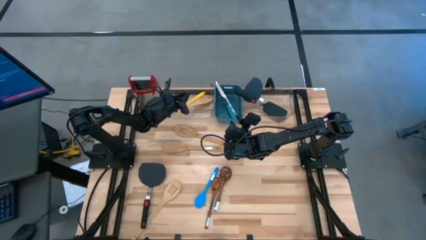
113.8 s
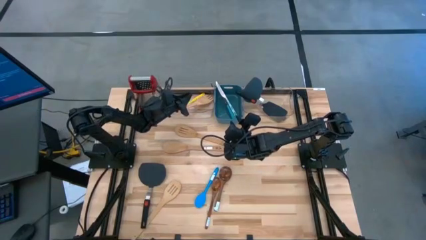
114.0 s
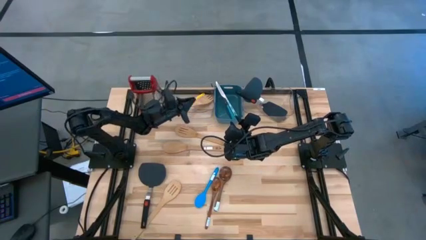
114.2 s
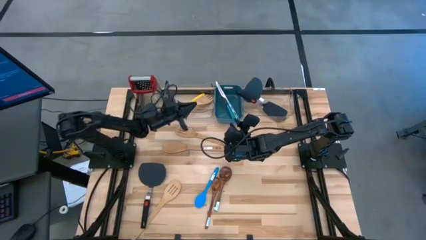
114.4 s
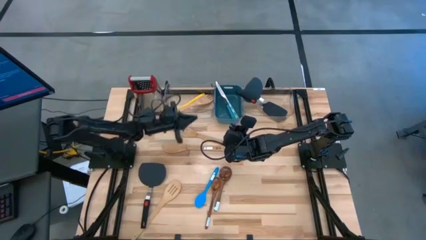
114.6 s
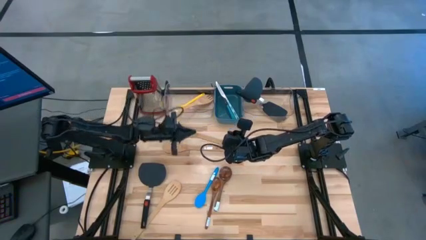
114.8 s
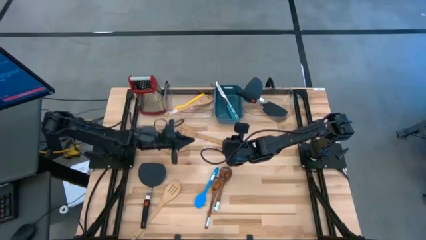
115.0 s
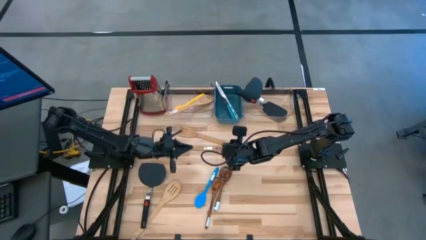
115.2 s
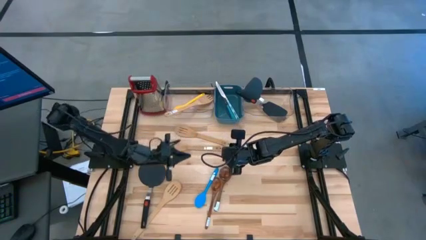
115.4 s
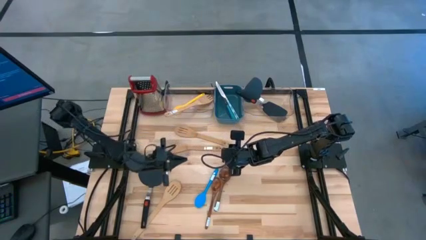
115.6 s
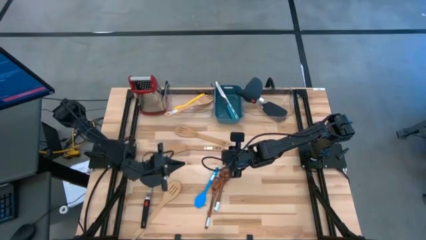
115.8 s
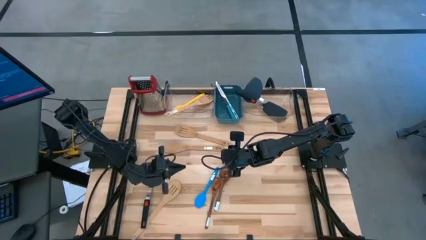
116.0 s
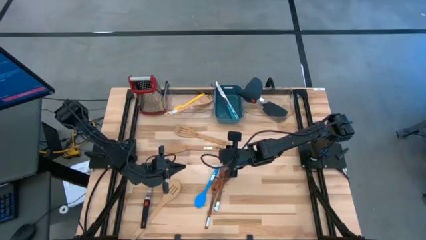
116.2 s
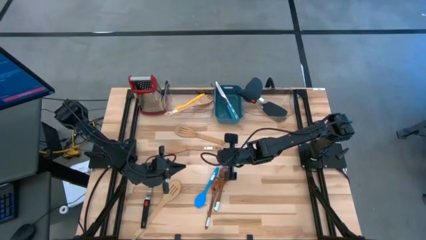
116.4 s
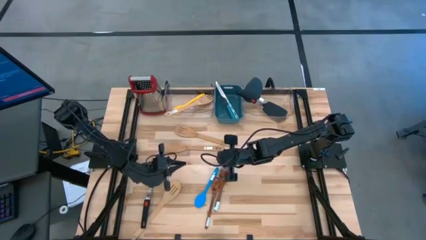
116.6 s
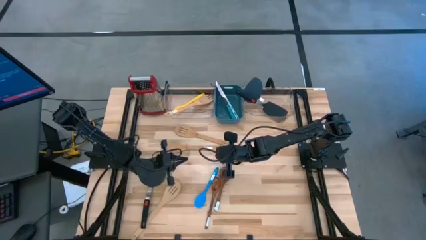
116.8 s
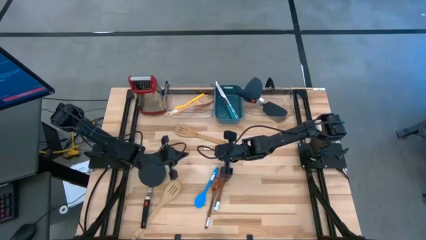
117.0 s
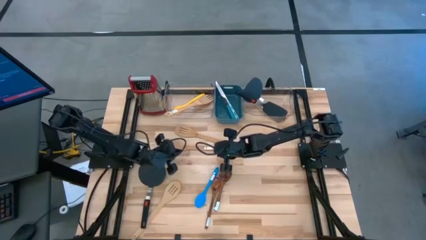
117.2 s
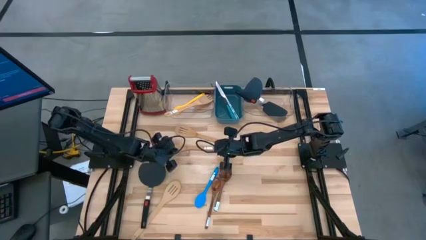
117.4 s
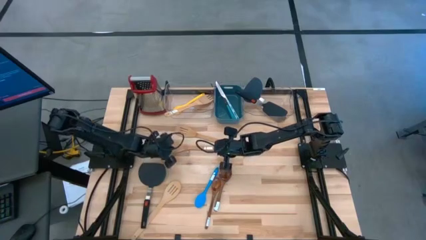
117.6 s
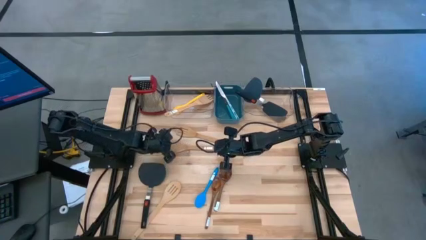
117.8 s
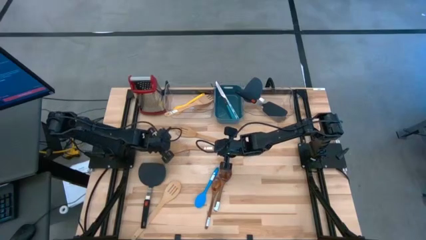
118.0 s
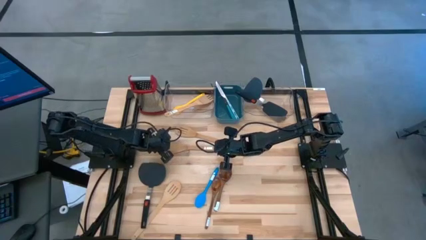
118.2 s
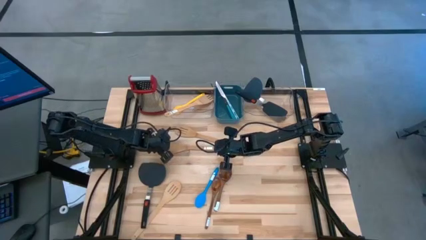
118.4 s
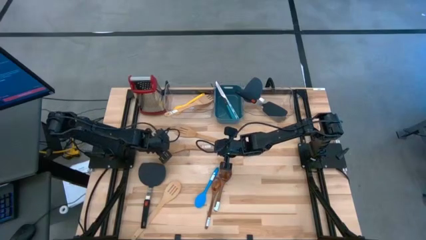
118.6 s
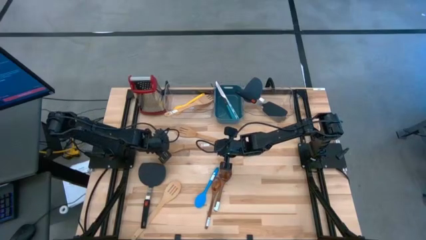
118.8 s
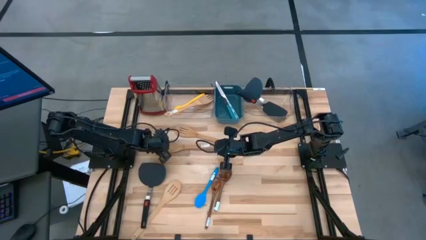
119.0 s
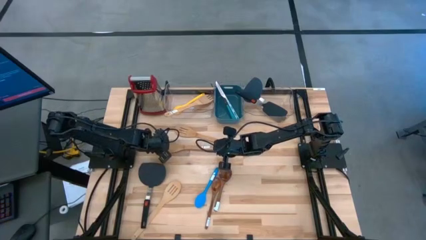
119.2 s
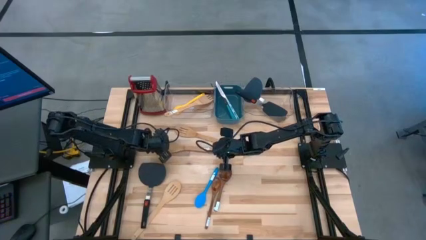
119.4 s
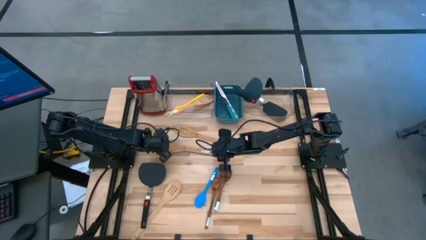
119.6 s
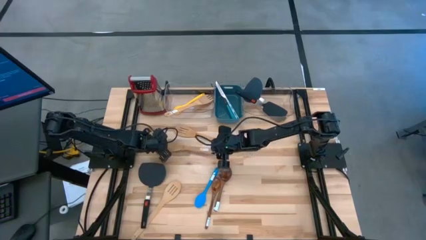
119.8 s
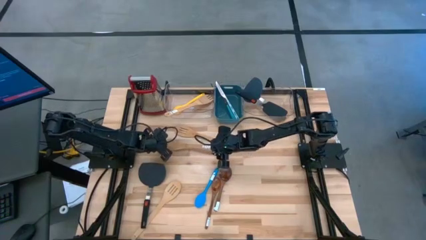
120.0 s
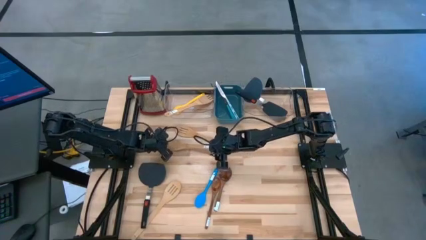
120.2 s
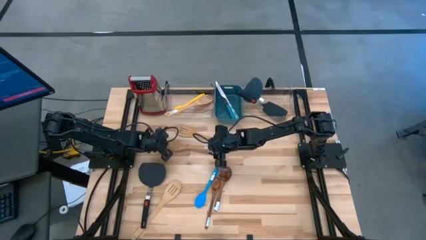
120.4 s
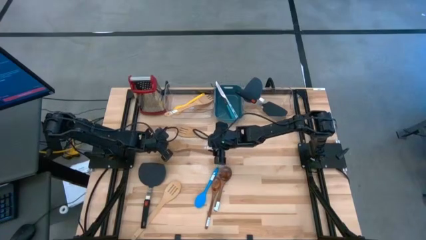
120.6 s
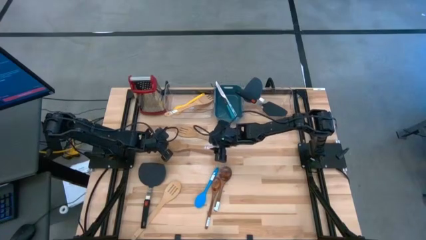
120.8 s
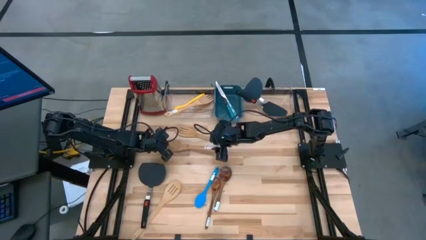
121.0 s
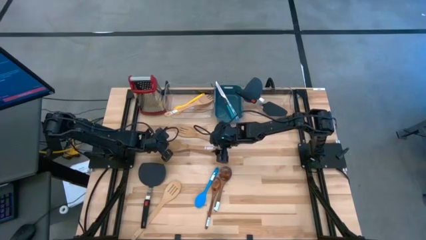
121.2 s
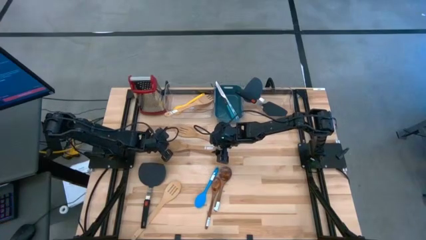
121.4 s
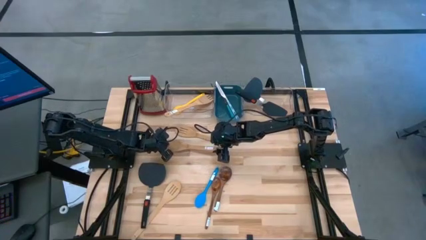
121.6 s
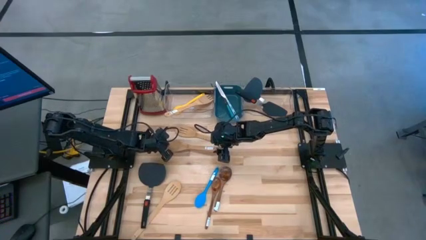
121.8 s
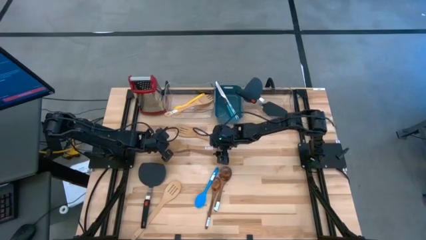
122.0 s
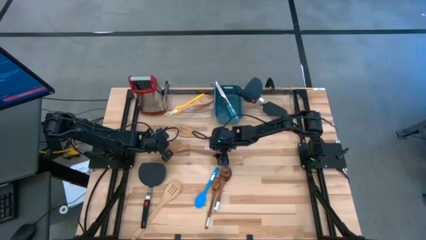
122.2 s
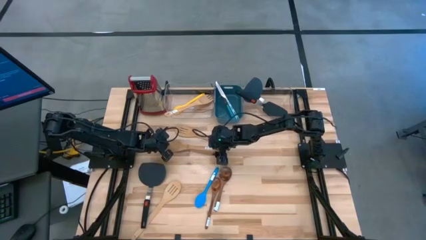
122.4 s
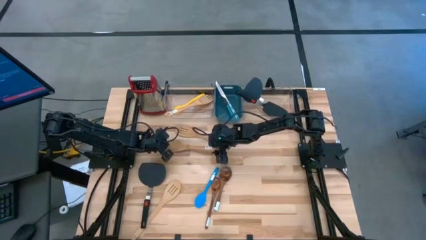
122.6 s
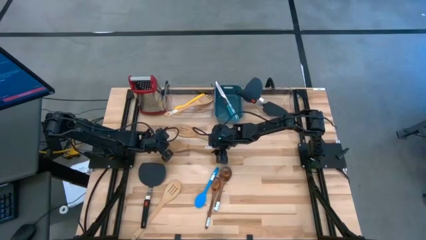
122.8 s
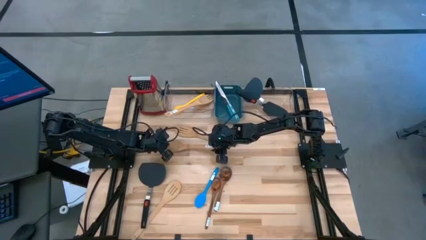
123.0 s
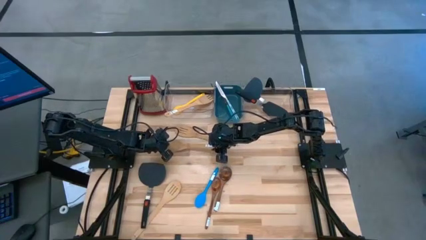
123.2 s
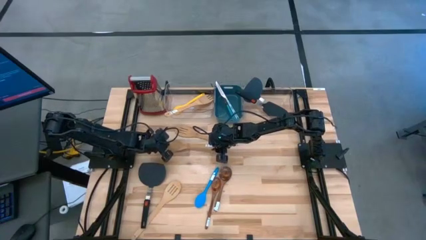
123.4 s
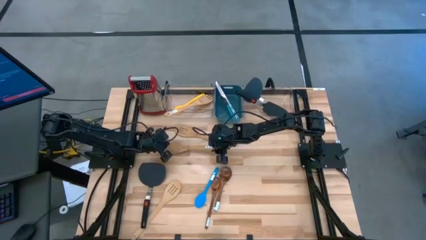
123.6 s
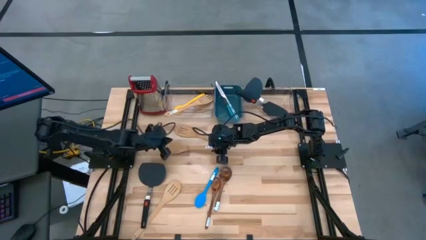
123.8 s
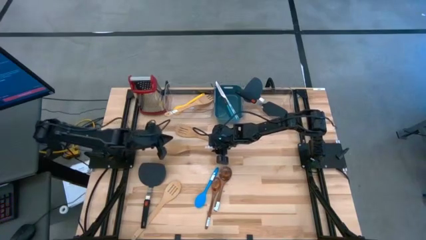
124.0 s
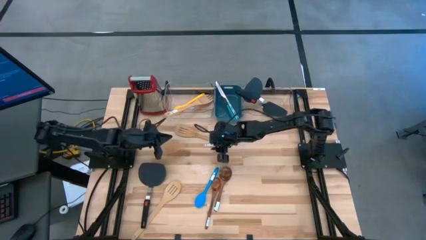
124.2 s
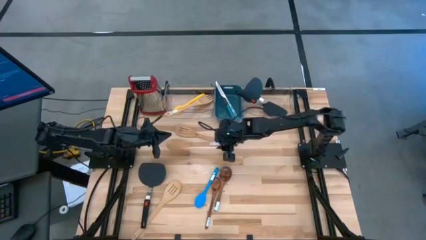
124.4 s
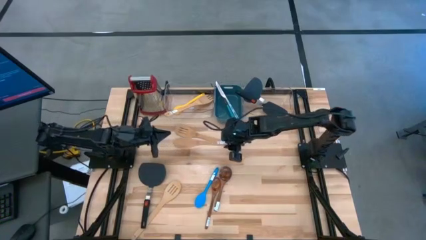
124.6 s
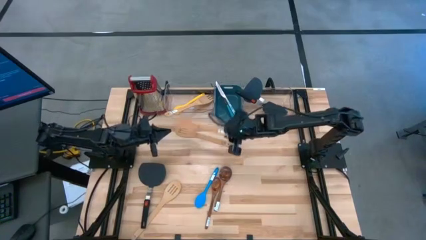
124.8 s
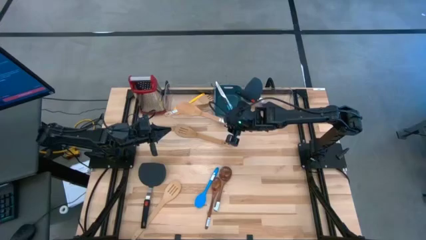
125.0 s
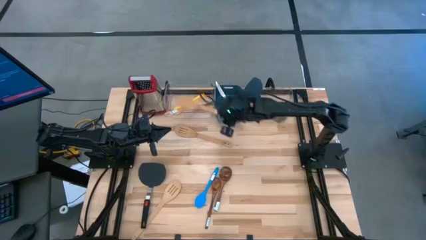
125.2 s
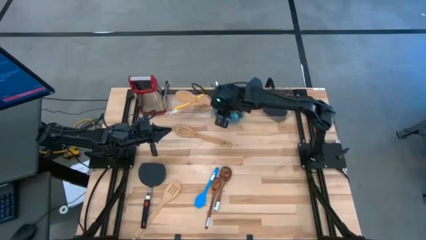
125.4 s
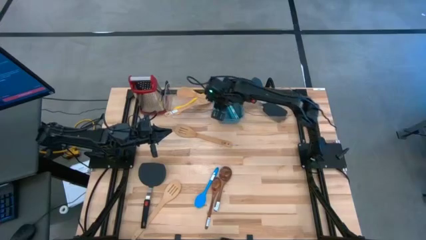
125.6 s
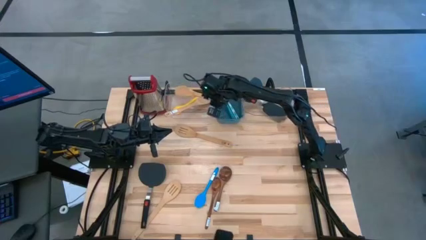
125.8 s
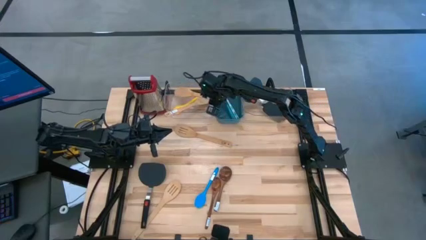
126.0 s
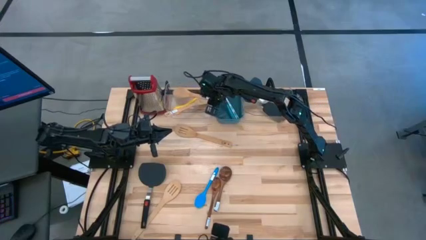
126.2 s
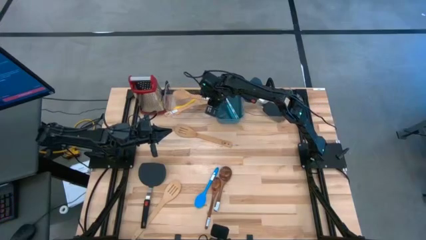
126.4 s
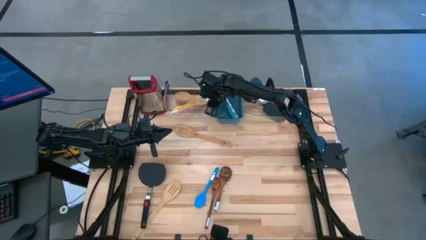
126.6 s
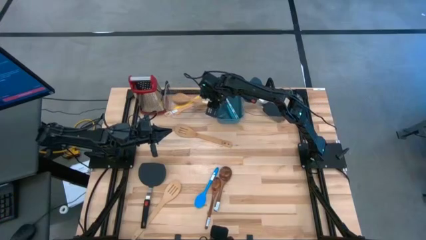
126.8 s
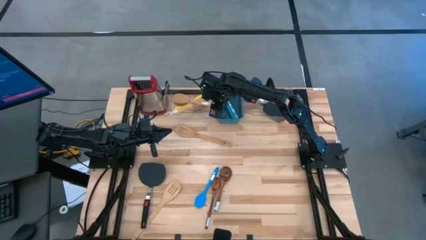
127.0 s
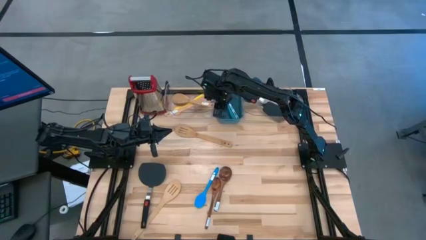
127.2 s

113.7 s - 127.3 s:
Task: Pick & Place Kitchen Items
Put the brown slotted spoon into the left transparent bin

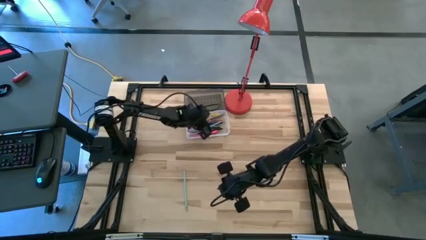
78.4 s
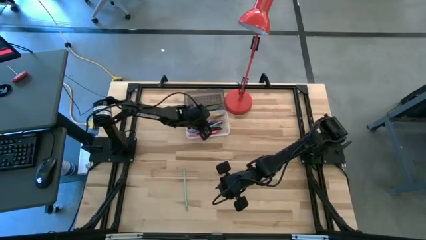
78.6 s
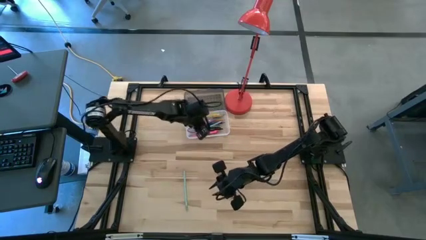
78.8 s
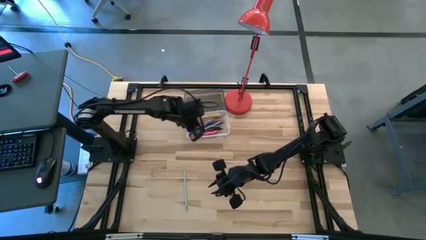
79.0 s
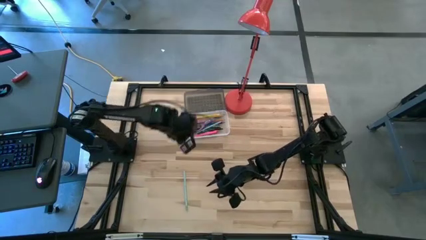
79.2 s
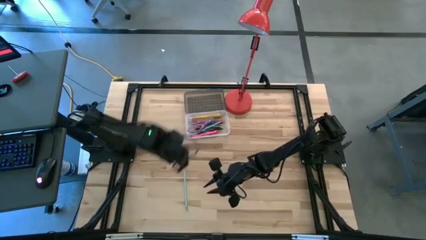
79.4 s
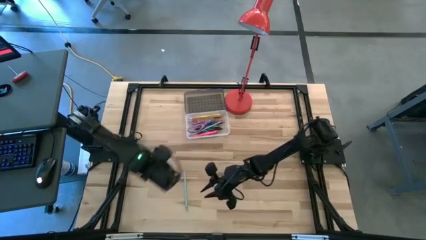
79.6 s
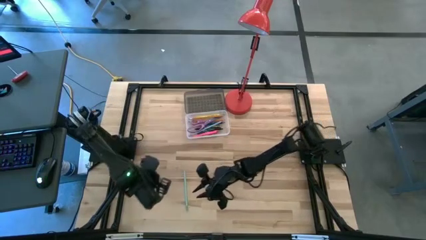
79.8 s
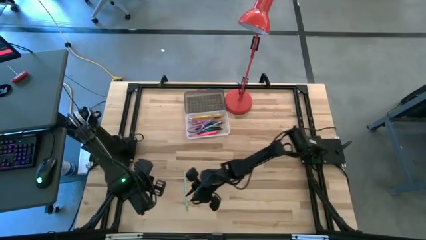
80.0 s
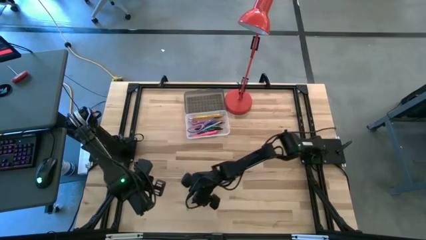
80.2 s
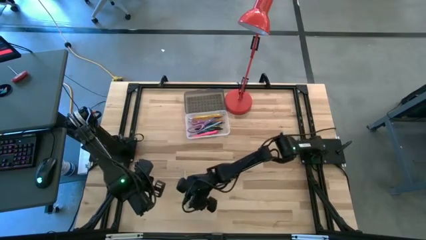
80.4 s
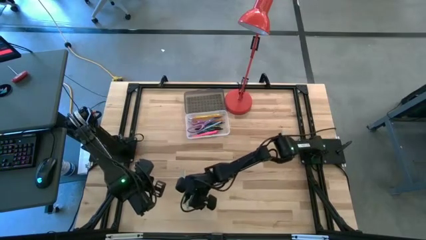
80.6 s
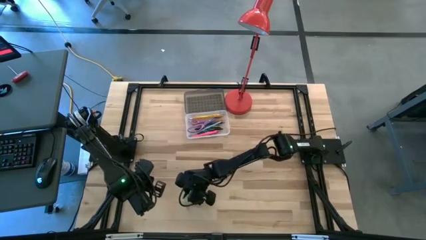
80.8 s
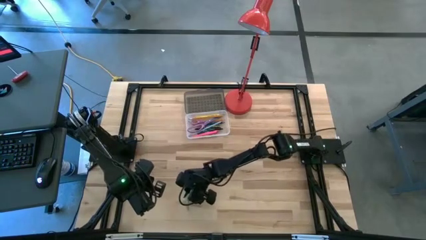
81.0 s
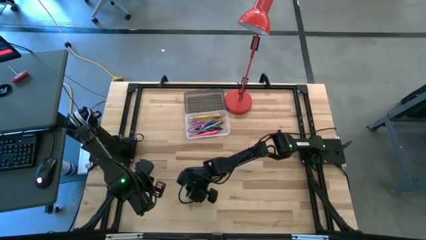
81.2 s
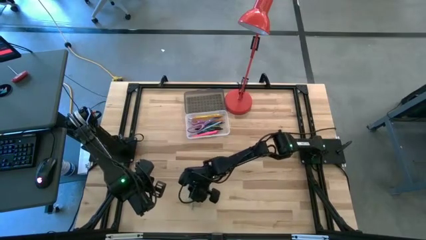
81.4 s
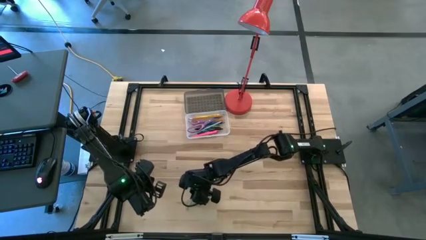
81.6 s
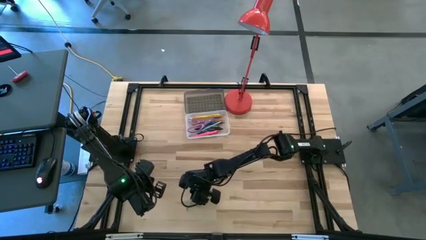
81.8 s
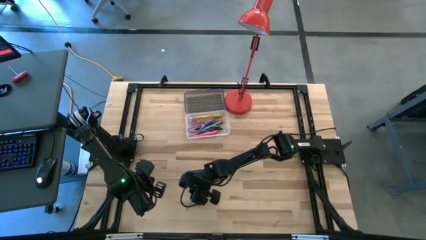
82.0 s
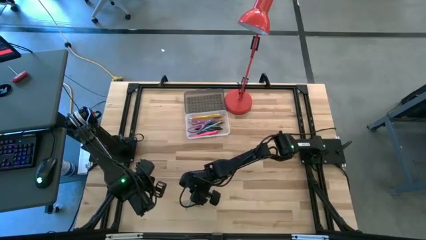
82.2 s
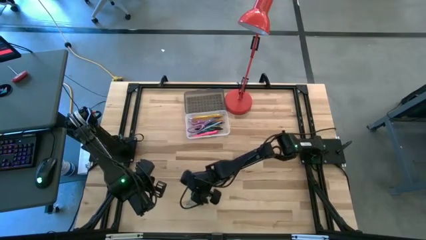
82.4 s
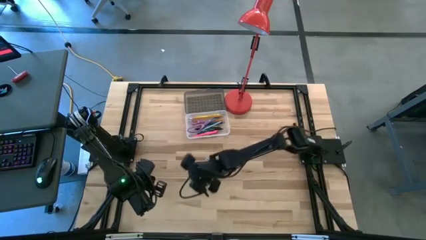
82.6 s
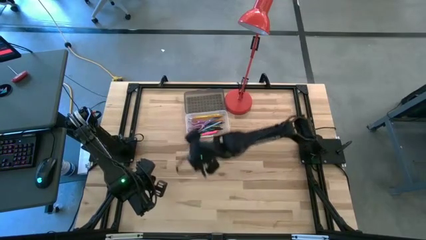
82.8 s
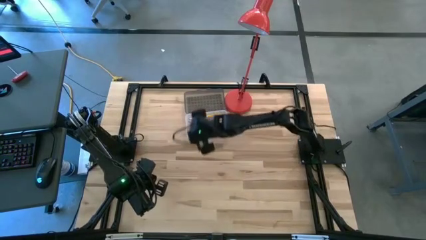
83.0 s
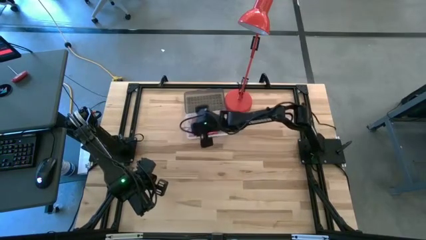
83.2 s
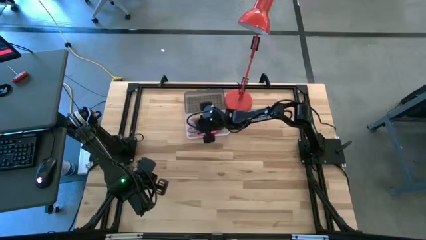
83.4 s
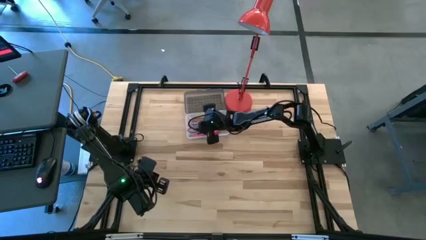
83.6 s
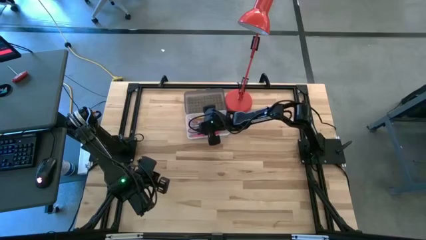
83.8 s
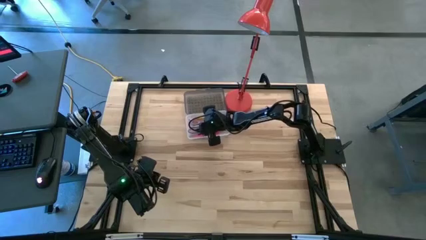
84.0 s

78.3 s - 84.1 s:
Task: Pick & place school supplies into a supply box
Put the light blue pencil into the black supply box
